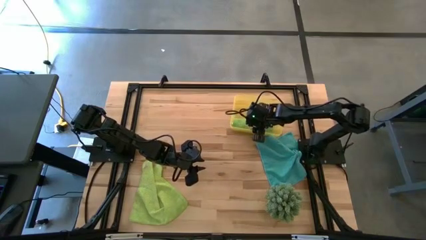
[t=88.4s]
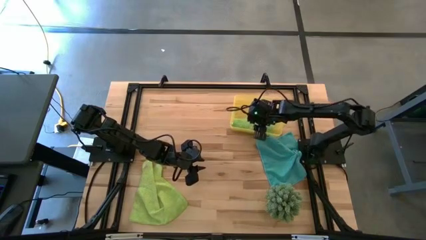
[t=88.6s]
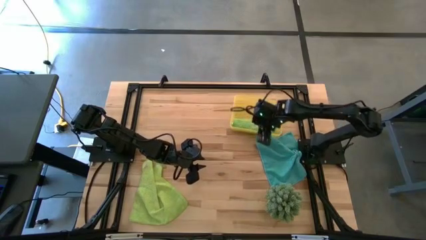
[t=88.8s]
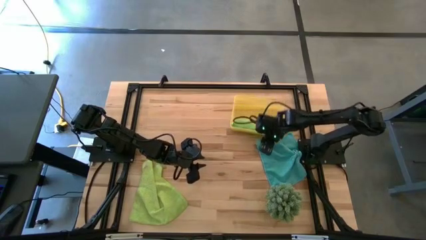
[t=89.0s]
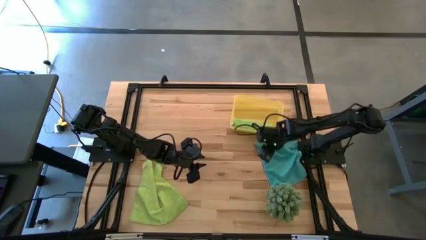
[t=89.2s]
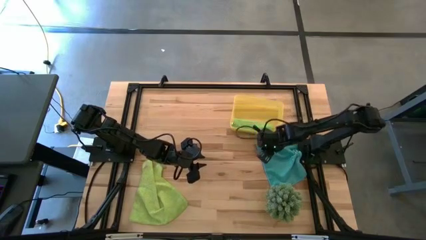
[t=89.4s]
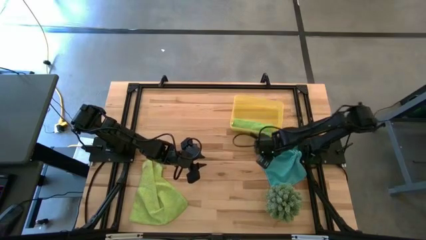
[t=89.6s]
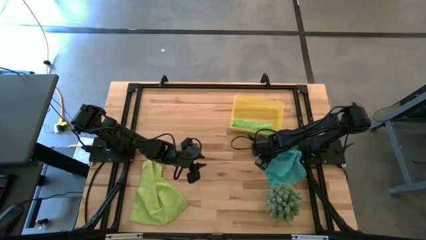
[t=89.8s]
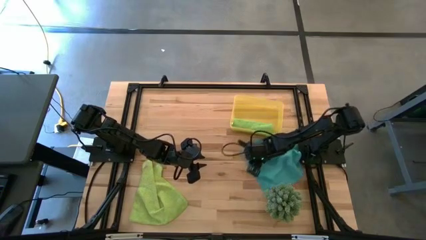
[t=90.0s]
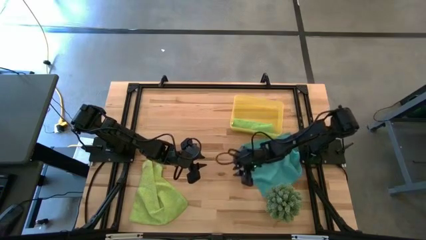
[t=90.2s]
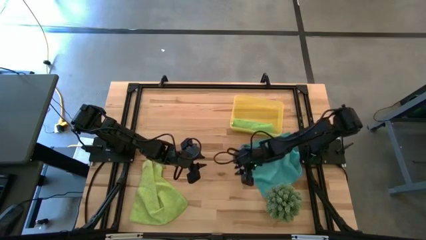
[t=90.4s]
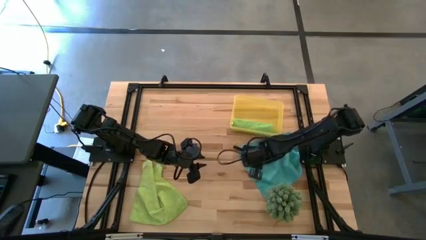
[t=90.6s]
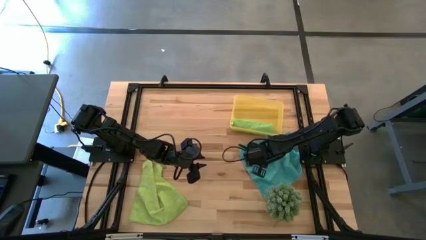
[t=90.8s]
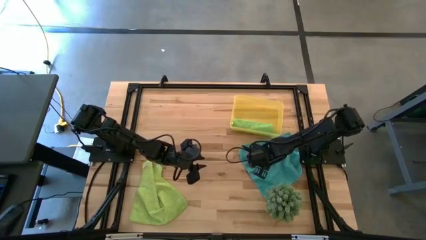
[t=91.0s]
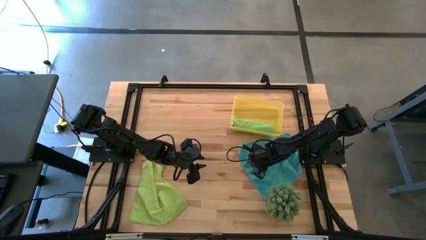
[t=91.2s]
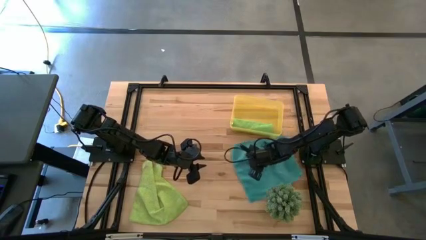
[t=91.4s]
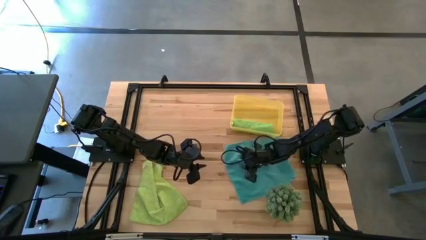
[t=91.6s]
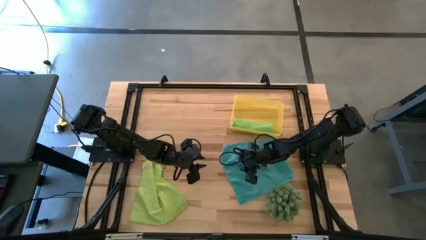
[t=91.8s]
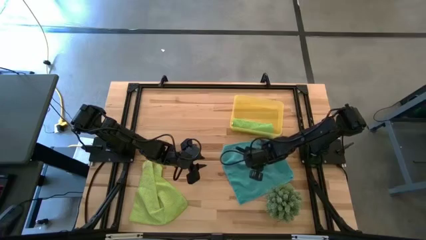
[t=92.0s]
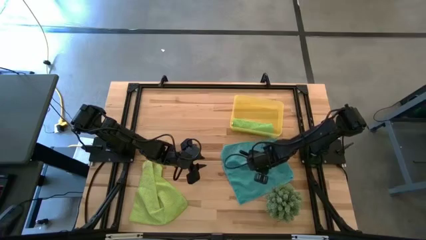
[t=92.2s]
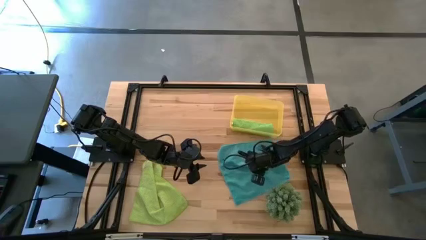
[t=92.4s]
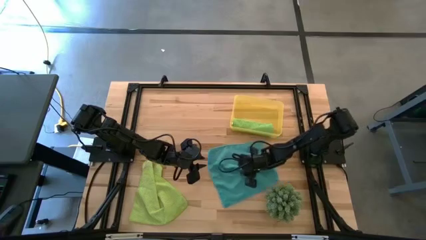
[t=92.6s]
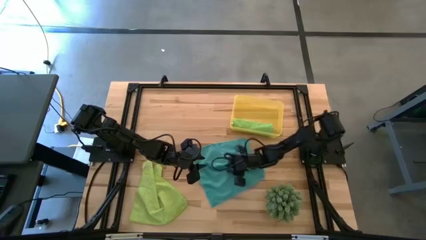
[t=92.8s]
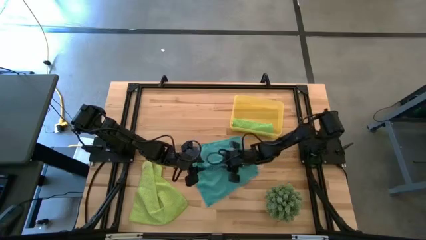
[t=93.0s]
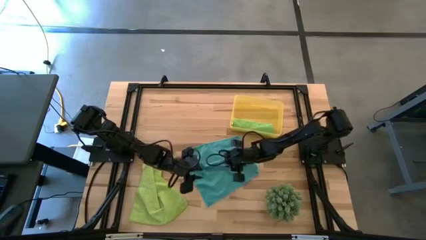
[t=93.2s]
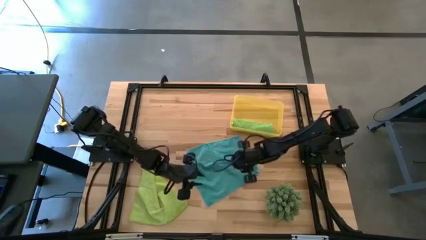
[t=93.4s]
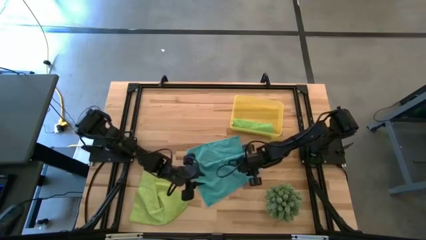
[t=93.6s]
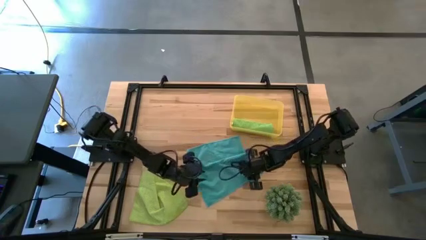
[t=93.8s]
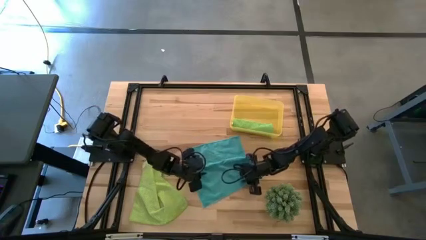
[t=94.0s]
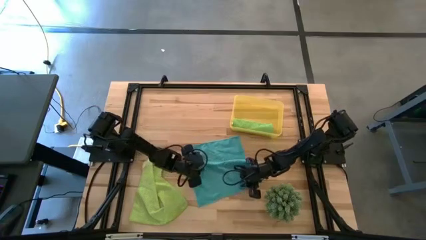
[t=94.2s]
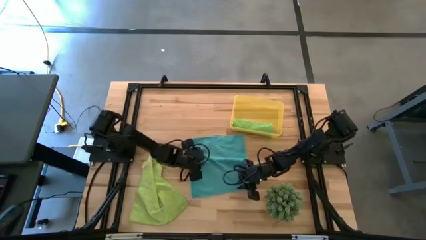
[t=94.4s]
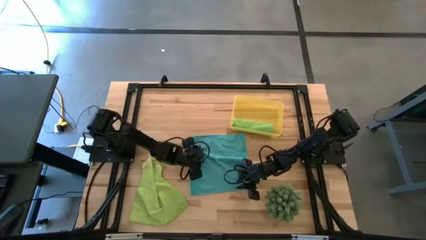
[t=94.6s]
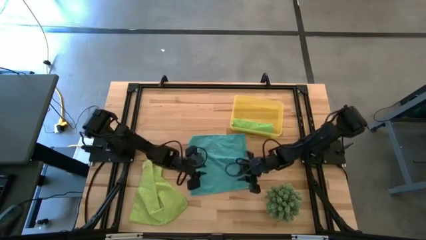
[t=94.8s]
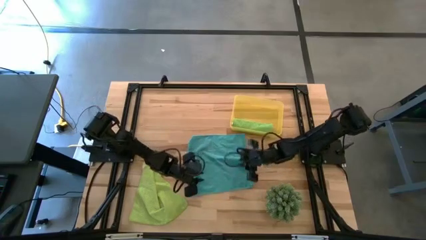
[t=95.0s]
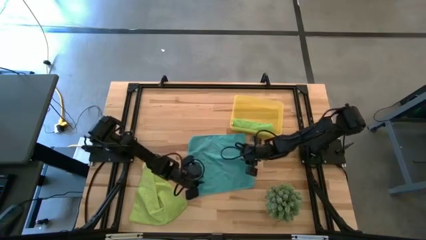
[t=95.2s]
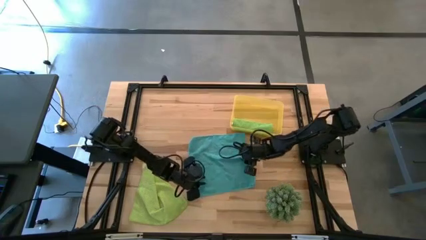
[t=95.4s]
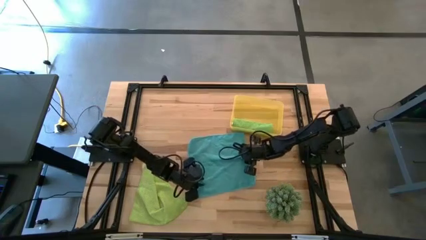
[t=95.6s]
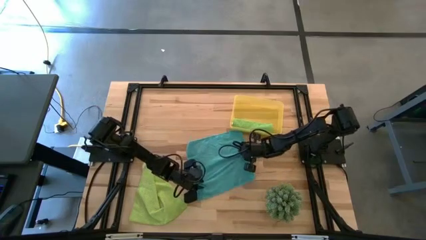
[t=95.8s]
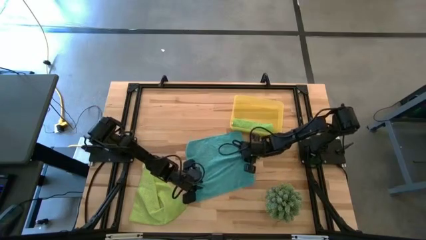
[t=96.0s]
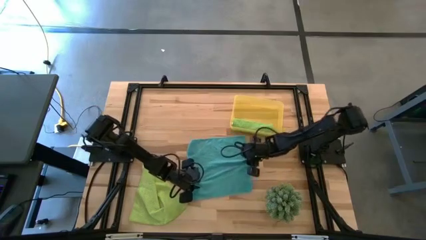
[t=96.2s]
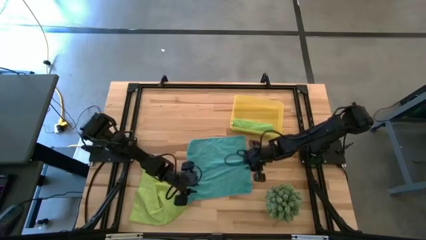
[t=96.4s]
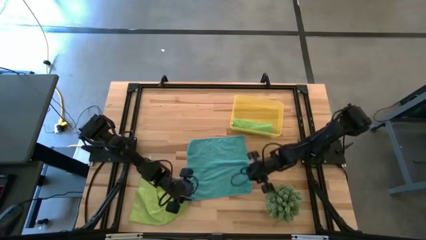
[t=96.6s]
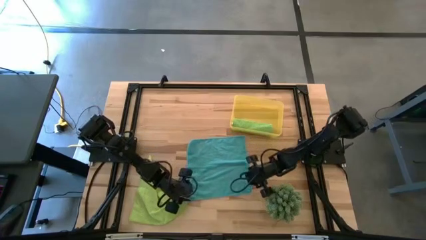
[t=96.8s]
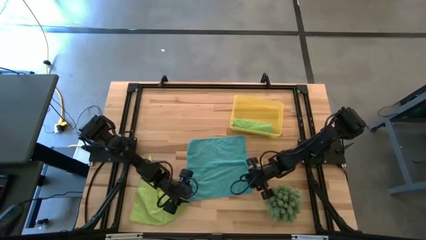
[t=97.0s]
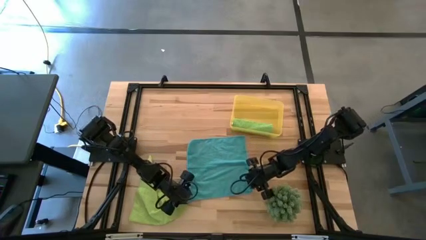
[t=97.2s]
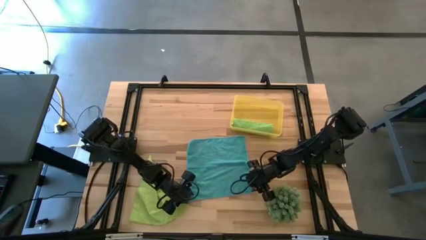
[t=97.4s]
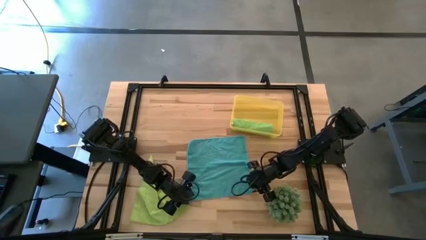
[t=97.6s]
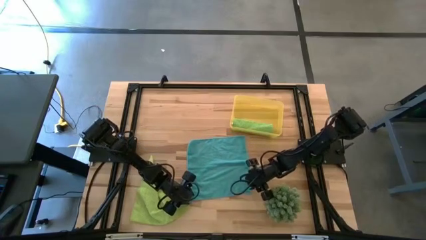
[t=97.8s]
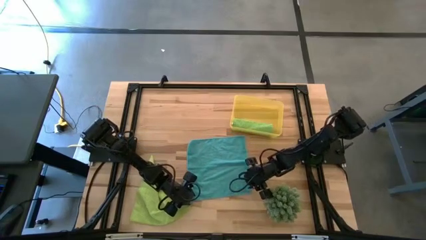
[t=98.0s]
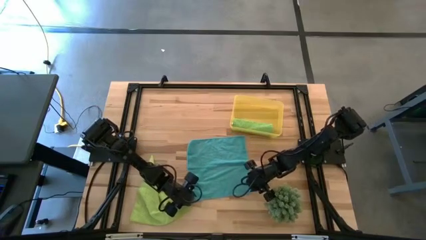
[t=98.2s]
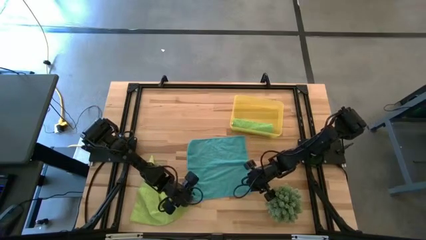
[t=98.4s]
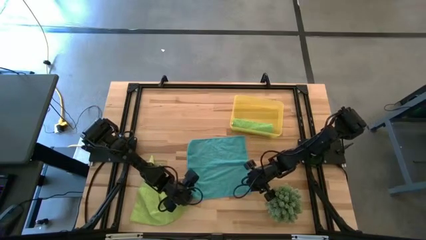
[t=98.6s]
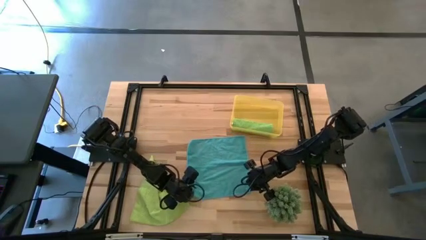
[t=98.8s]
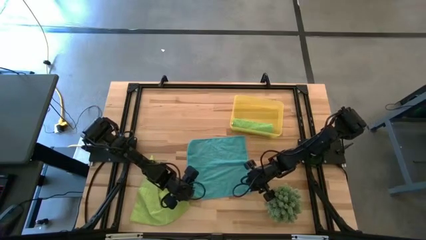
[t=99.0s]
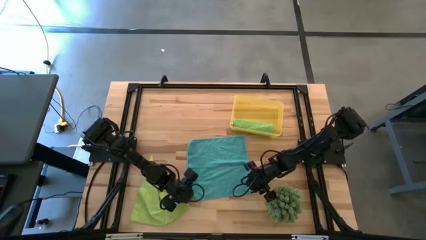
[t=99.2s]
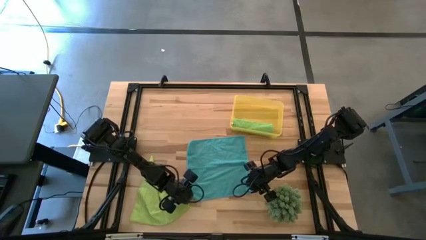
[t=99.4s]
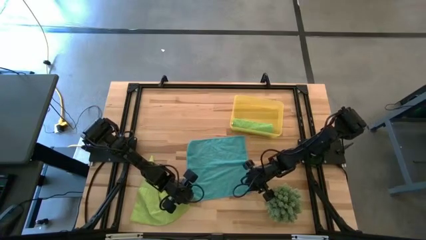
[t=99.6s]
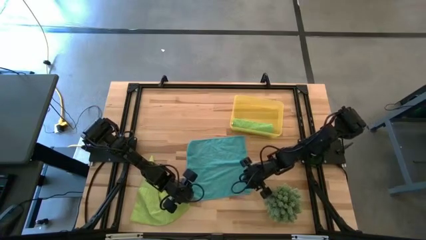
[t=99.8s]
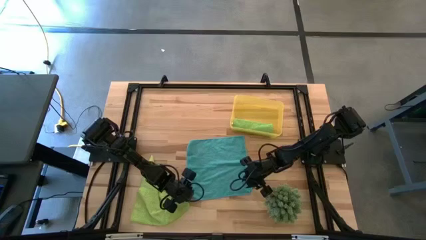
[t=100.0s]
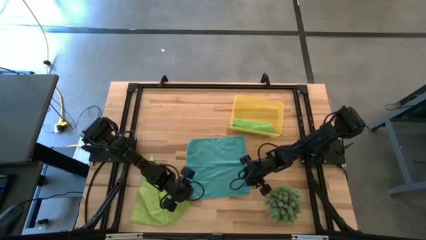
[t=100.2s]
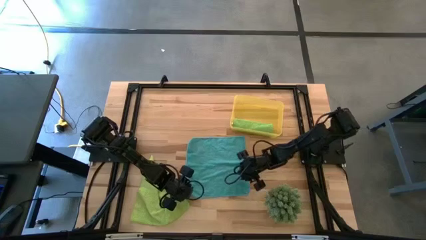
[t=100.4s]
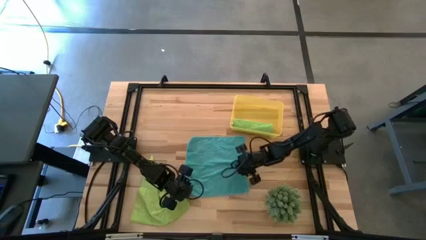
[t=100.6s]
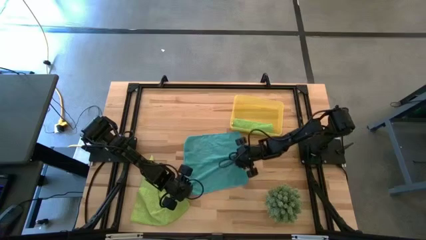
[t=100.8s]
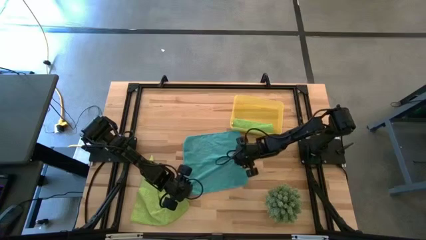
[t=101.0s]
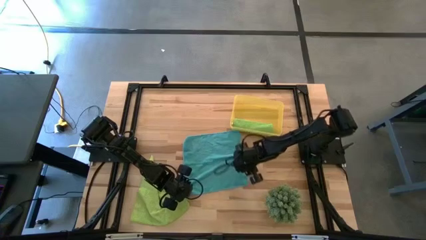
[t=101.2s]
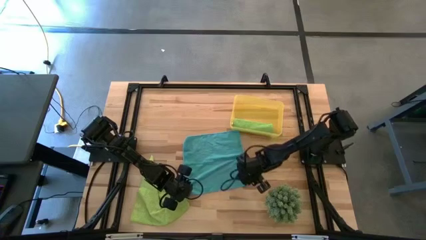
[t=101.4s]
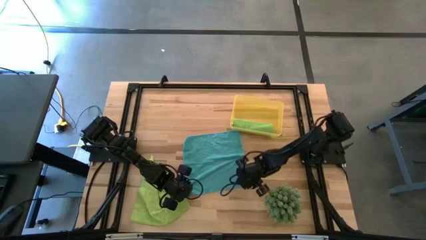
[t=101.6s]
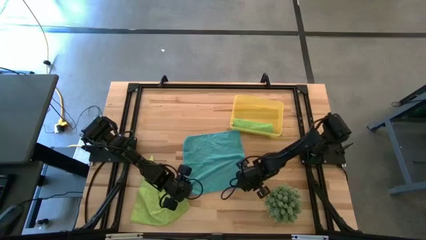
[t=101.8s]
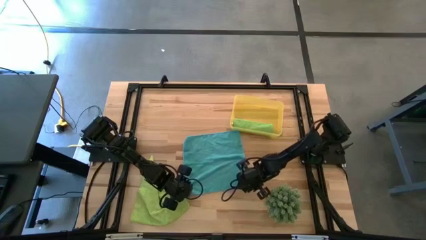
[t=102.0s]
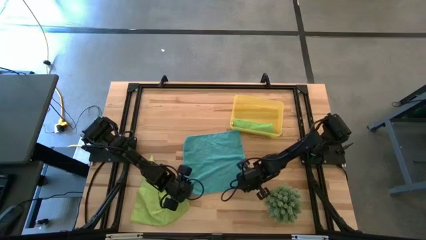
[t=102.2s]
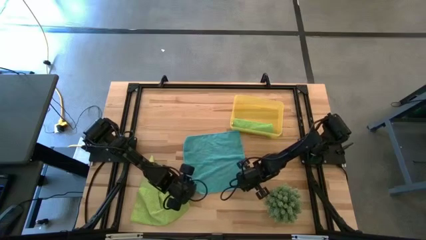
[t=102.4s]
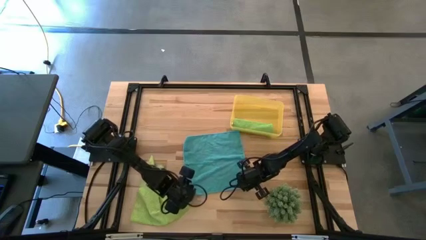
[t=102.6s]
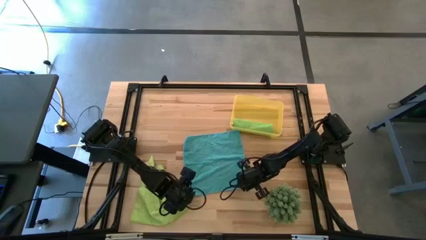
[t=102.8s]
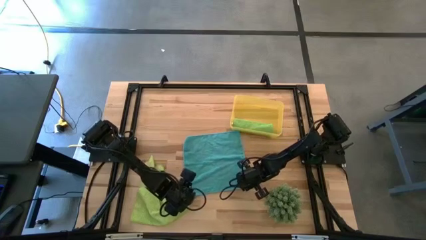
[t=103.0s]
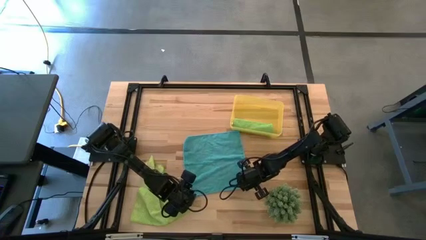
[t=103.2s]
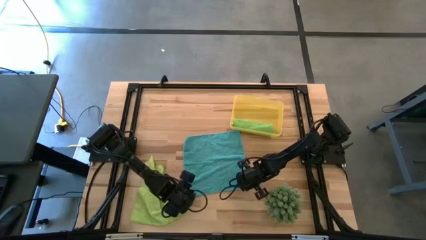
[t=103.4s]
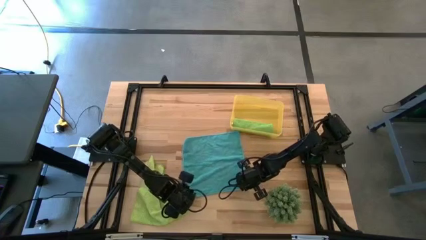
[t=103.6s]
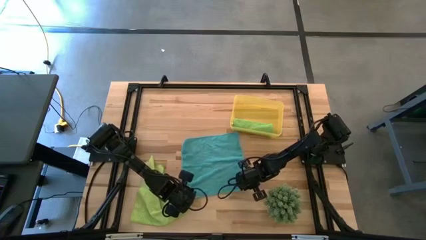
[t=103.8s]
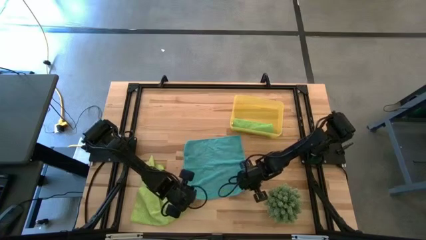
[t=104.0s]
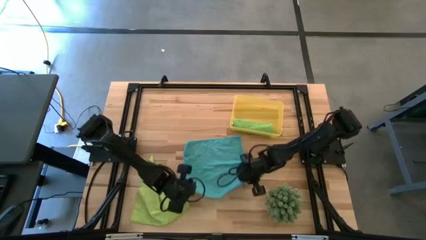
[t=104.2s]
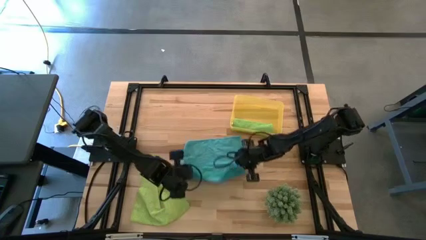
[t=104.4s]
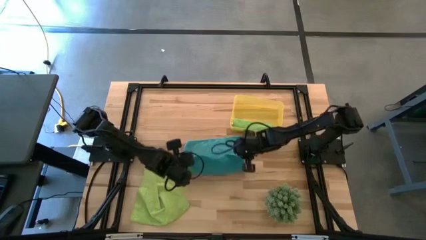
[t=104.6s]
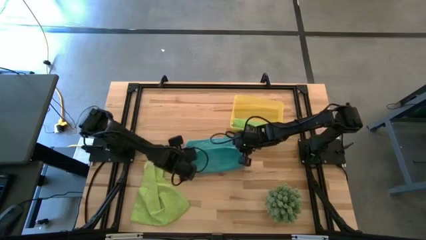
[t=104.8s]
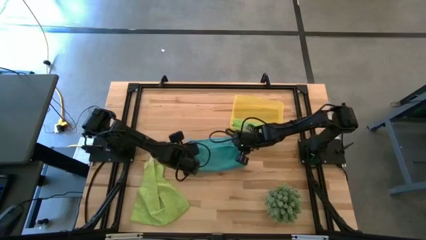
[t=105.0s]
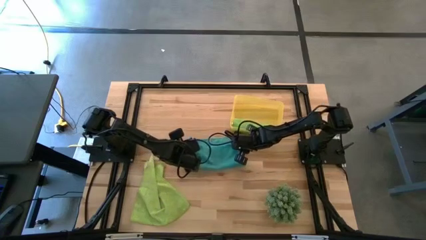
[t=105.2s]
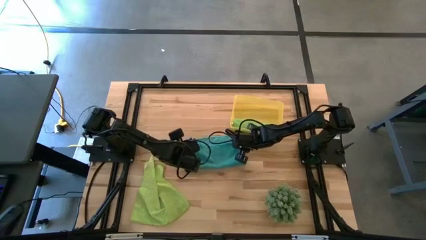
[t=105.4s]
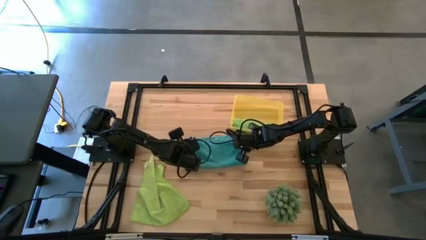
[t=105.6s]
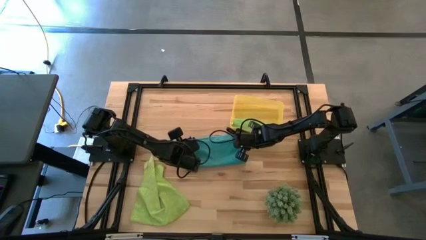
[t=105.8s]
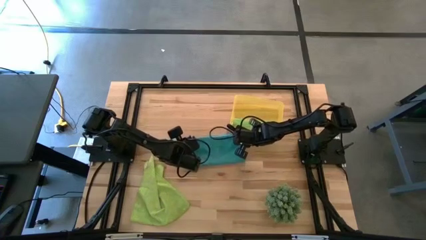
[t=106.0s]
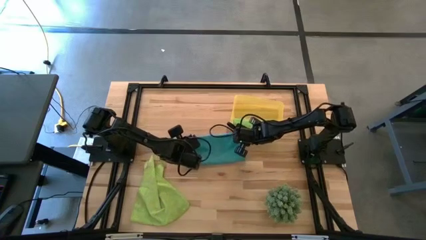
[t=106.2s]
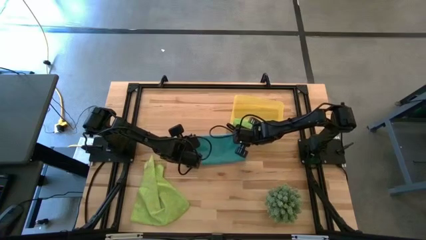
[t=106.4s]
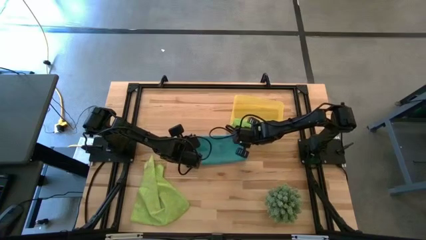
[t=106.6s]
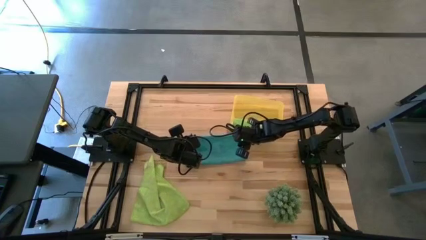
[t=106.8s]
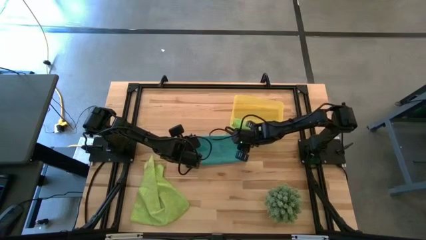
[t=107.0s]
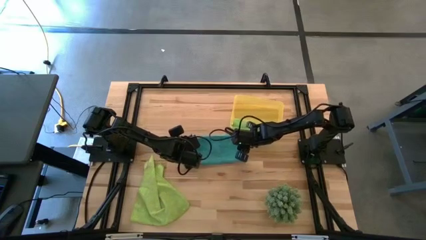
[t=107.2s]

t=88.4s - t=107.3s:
Task: Roll microfiber towels into tight, uniform cylinder then place into a basket
Fold the blue microfiber towel
